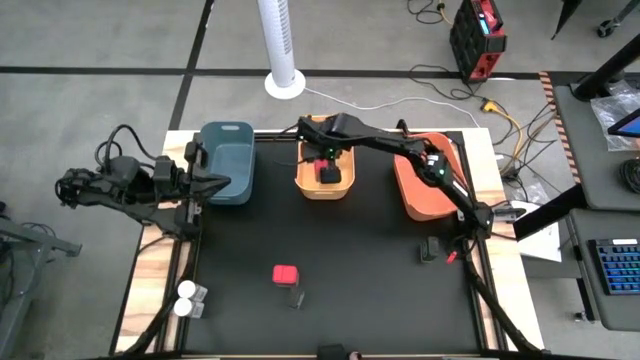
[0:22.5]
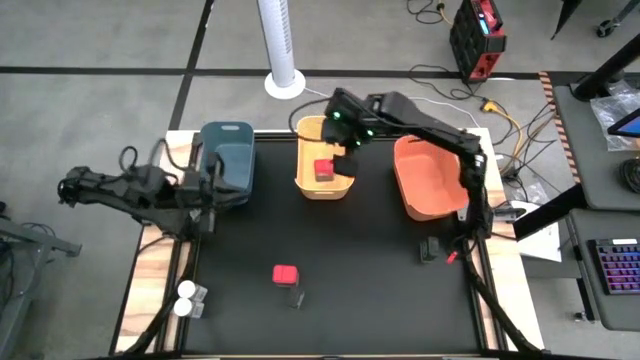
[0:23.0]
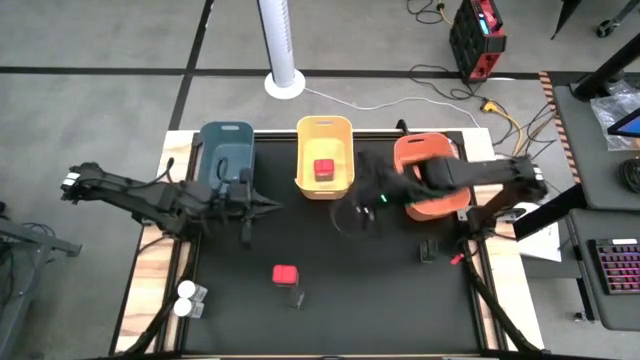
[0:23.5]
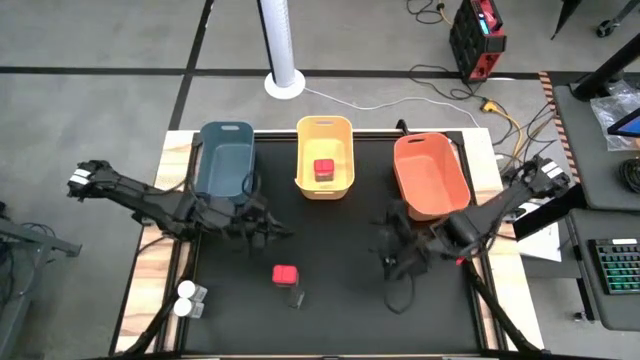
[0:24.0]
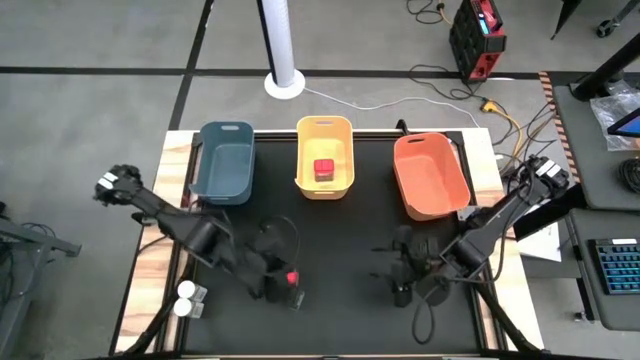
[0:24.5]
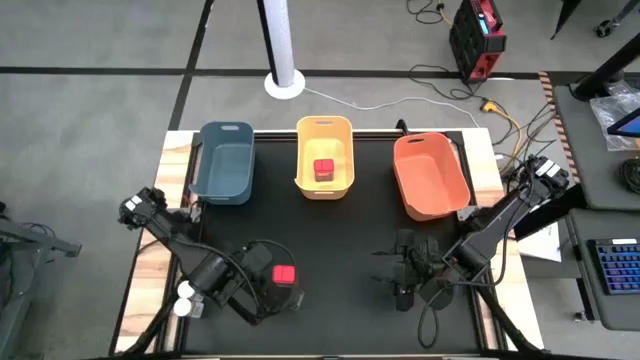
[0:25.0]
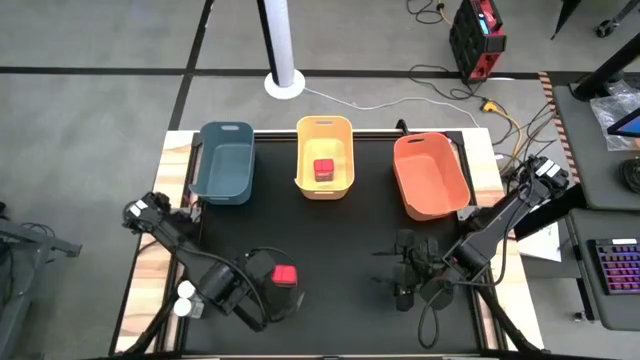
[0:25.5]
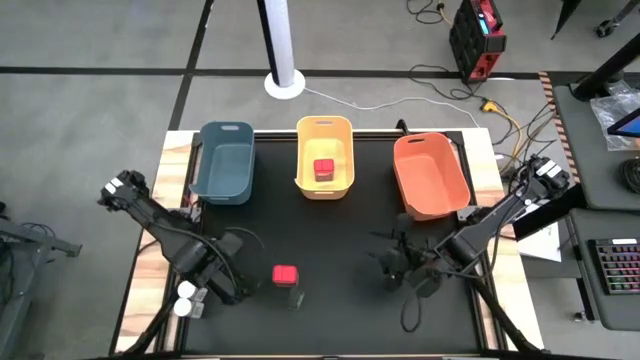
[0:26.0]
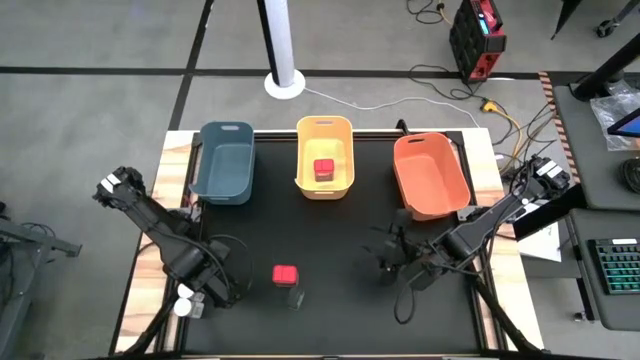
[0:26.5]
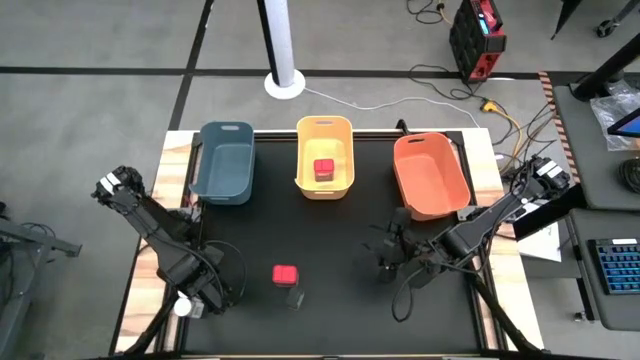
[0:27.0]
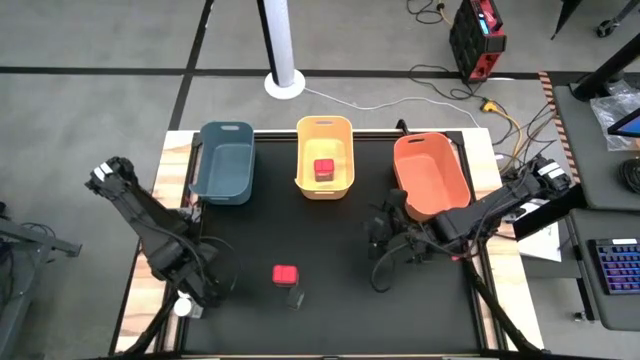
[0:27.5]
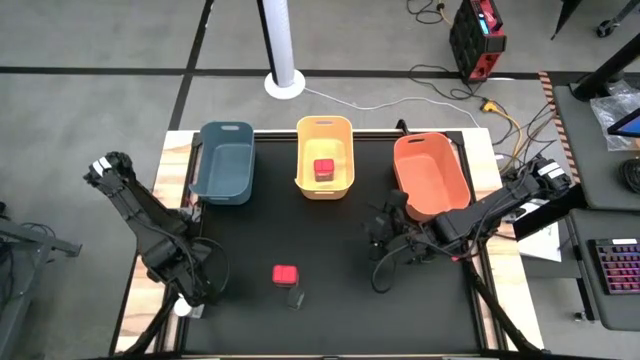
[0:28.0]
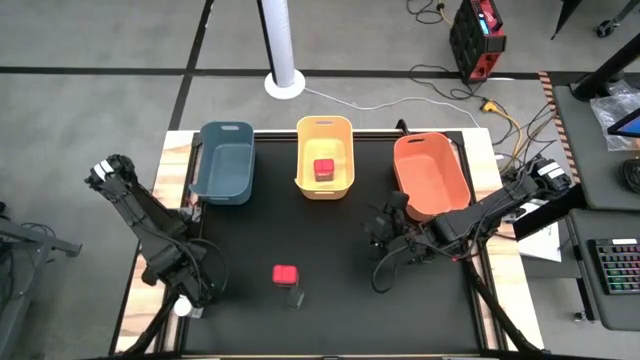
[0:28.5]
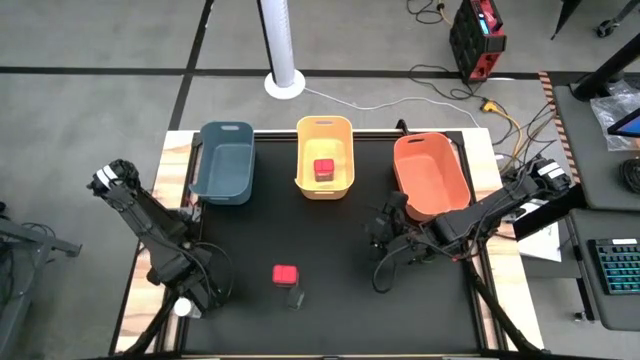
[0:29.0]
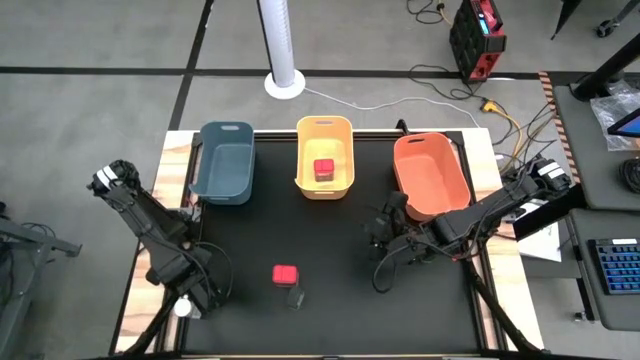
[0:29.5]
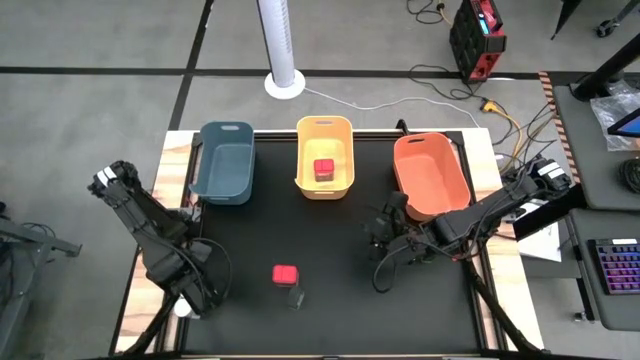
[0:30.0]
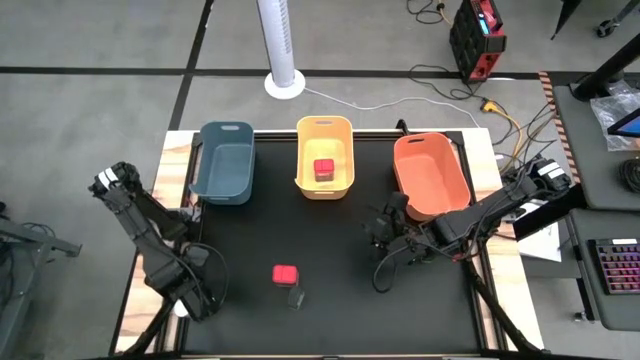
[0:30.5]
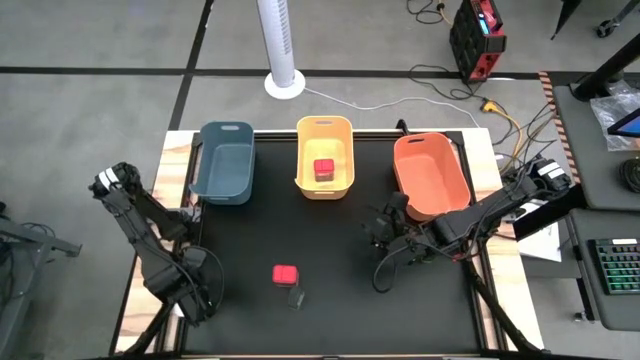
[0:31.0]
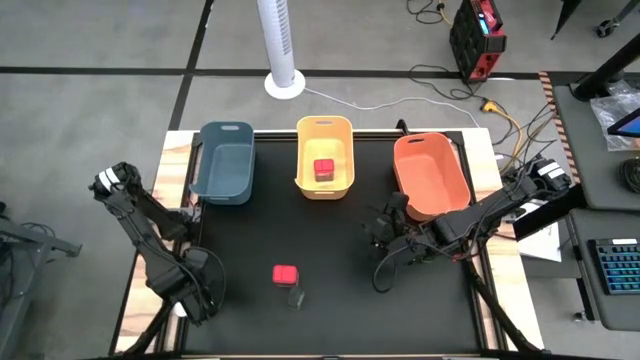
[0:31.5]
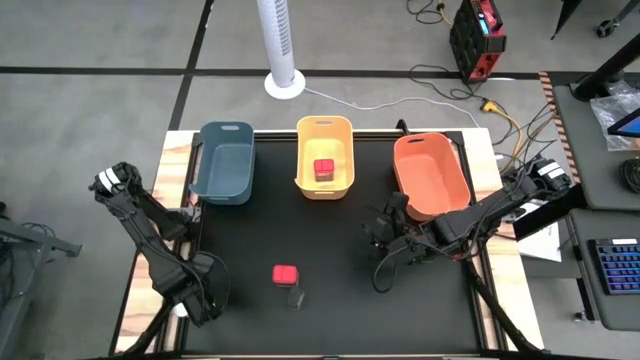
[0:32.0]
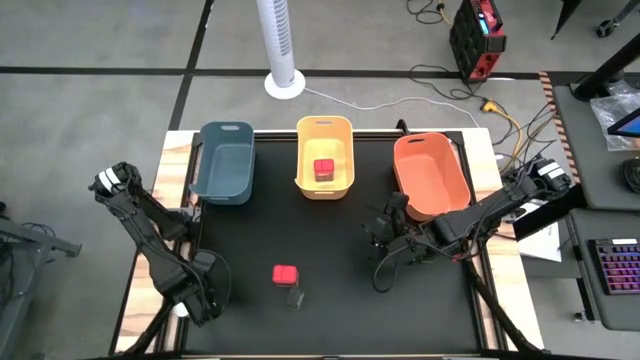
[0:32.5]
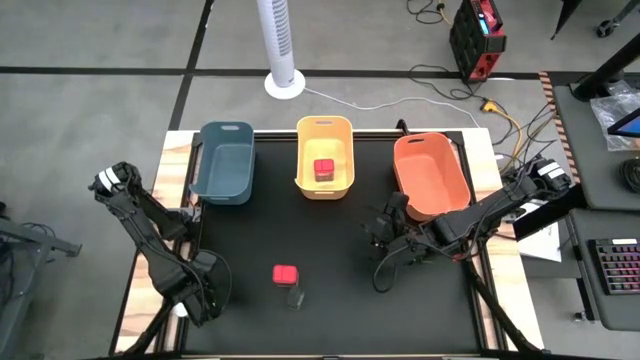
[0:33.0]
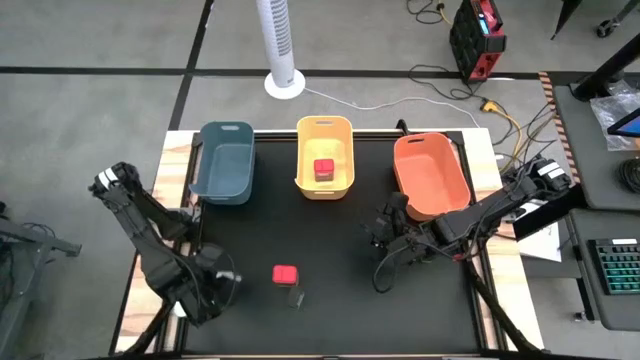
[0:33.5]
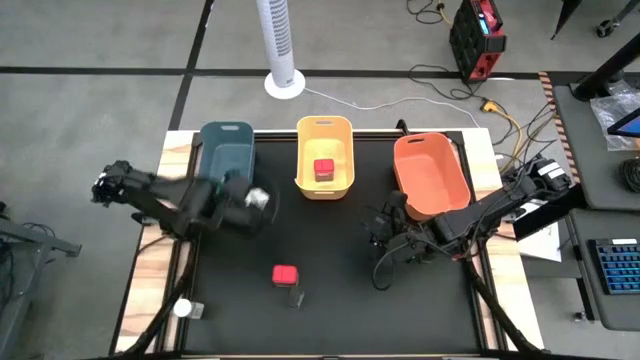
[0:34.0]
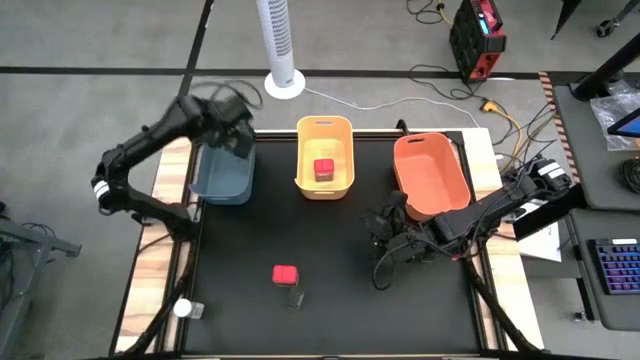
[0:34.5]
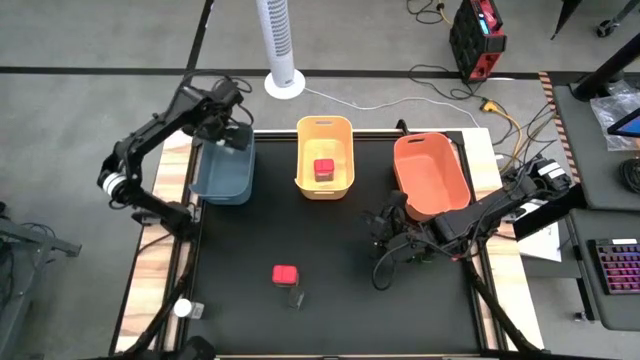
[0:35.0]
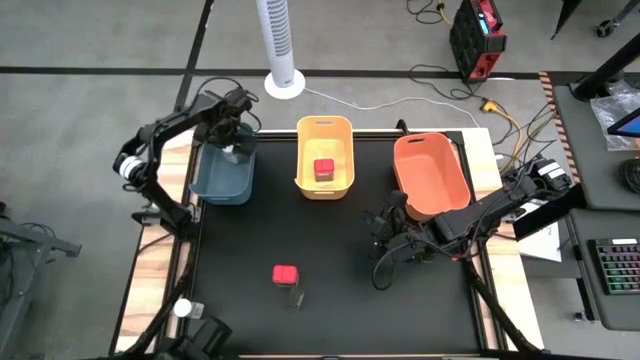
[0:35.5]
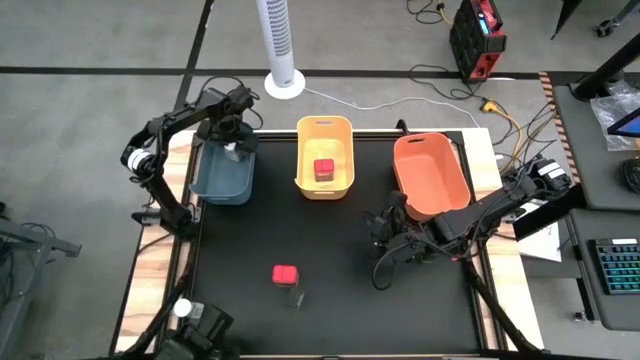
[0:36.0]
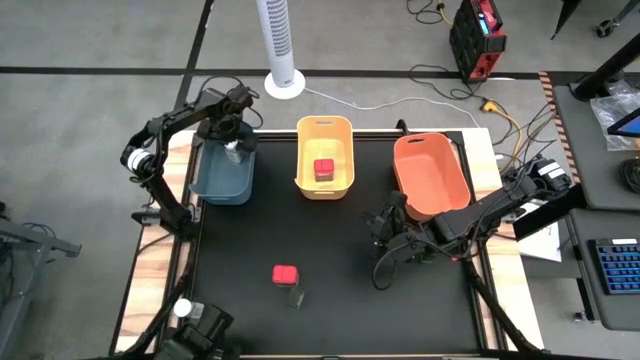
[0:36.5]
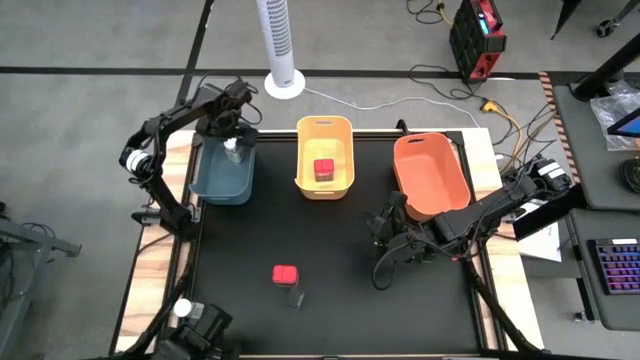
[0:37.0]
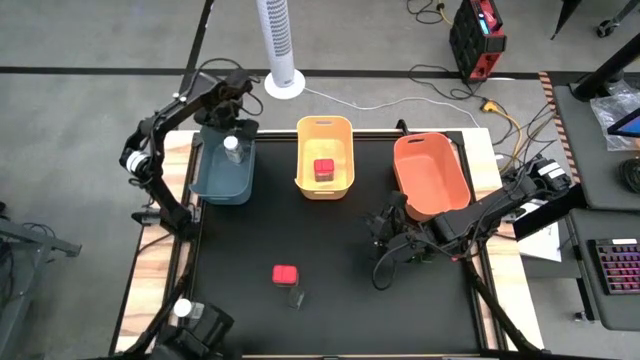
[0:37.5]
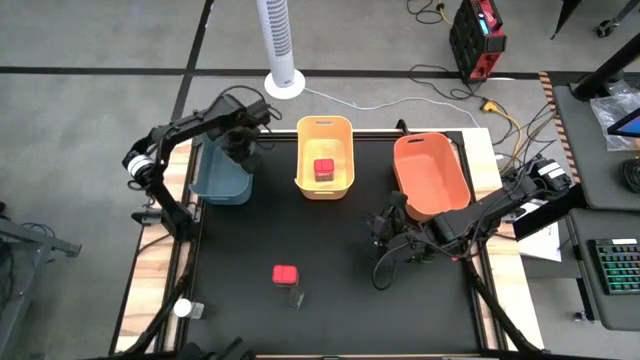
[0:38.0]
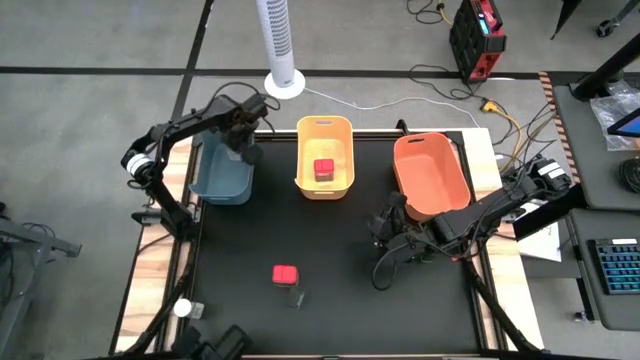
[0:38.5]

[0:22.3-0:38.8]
Task: Sort spices by type
Put the top white seasoning bottle into the gray bin

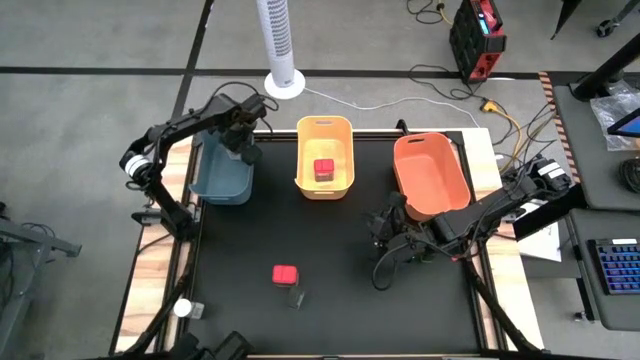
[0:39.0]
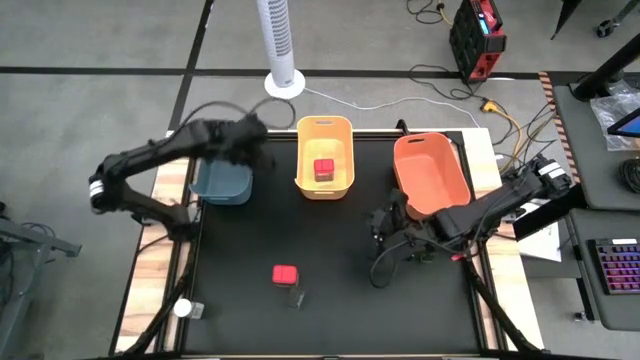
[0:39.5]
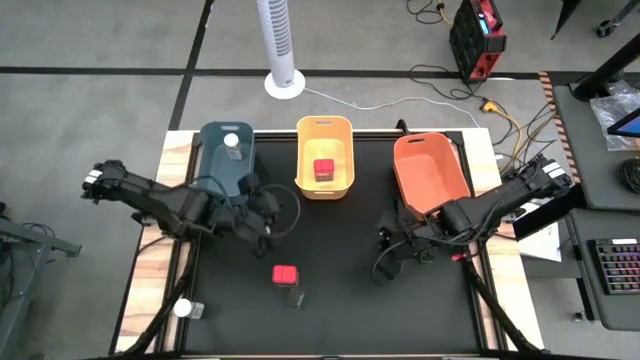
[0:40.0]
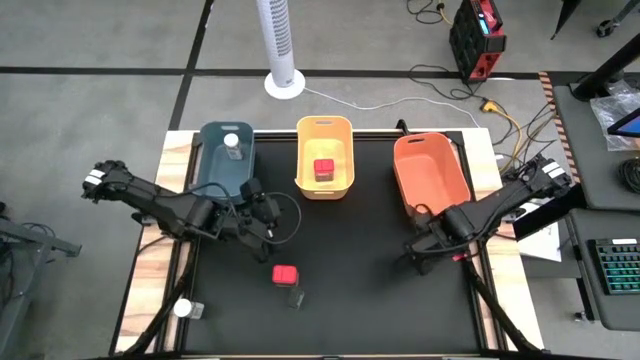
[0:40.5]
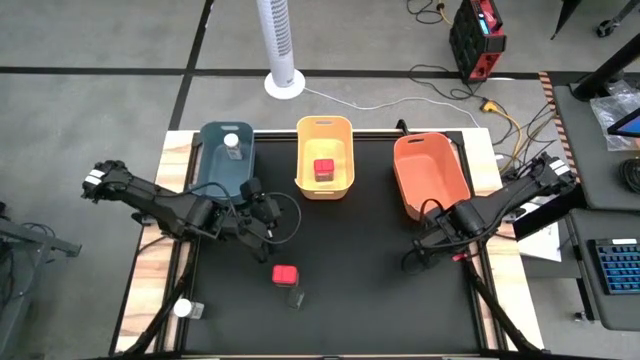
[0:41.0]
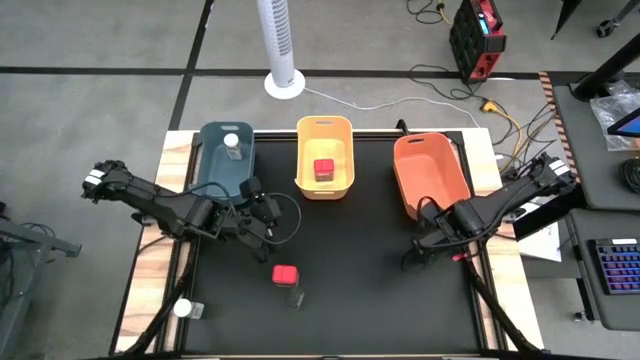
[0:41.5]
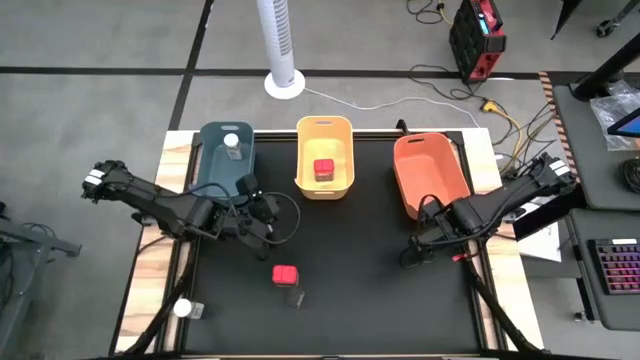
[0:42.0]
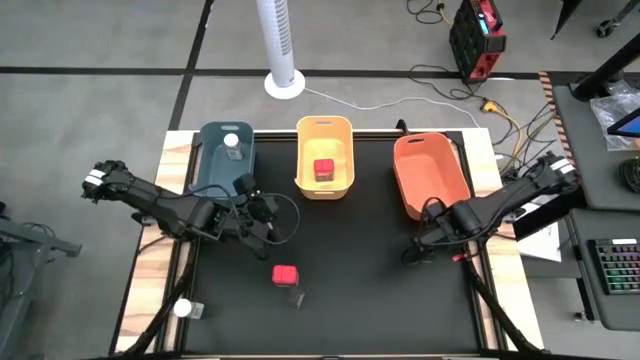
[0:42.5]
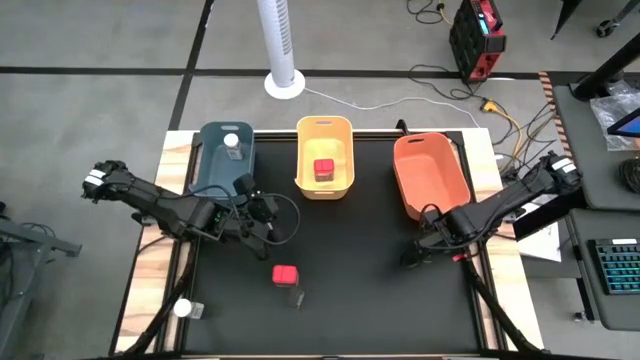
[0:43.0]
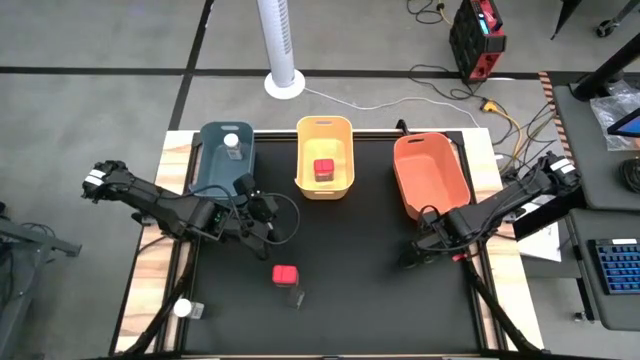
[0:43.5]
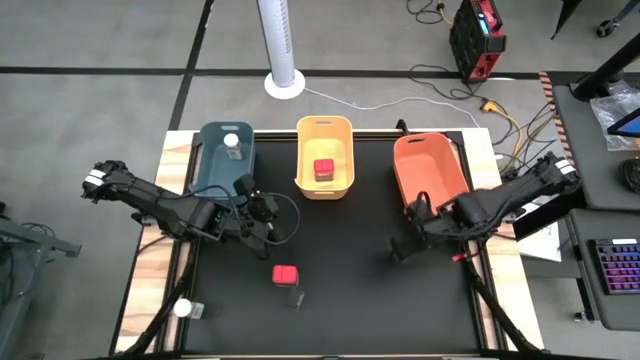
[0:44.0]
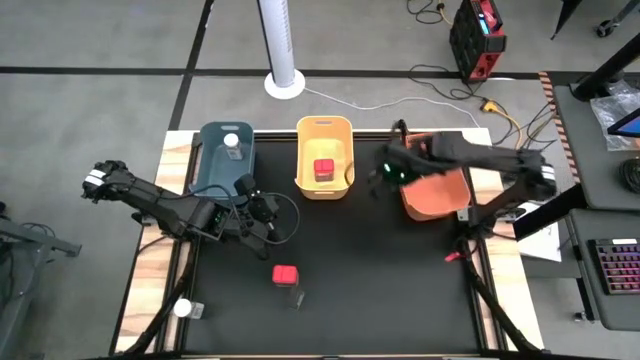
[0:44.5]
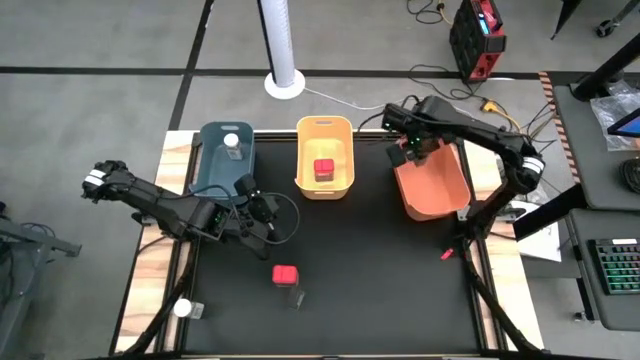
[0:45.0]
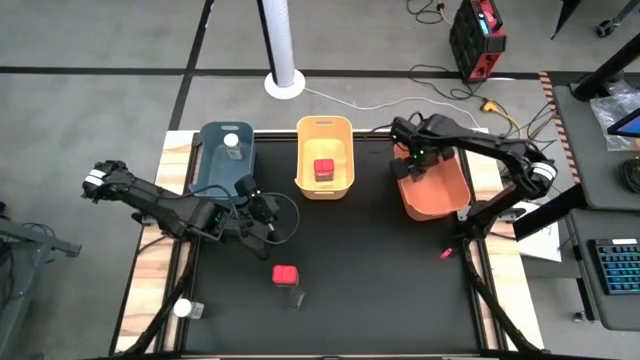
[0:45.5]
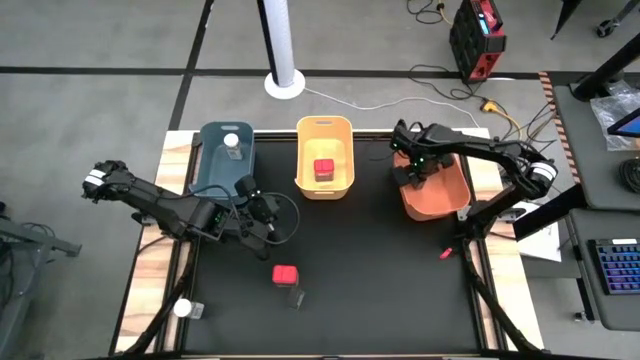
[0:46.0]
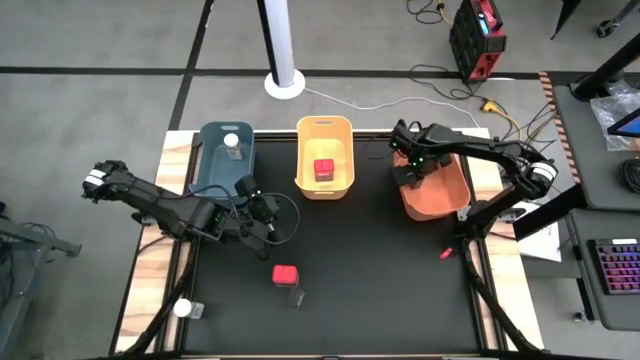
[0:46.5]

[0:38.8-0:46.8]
Put the top black seasoning can into the orange bin
